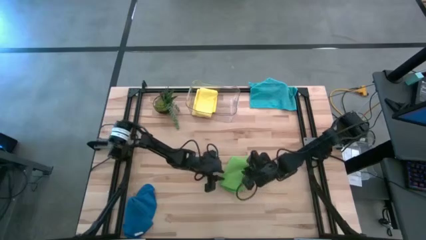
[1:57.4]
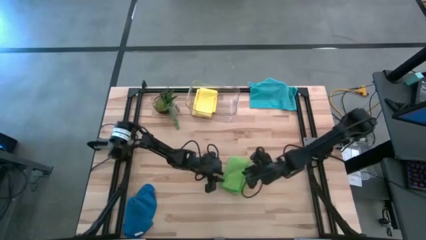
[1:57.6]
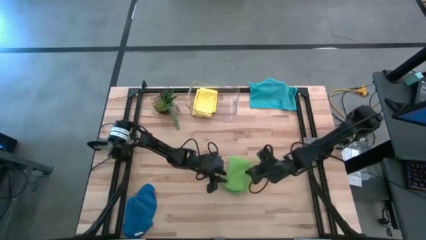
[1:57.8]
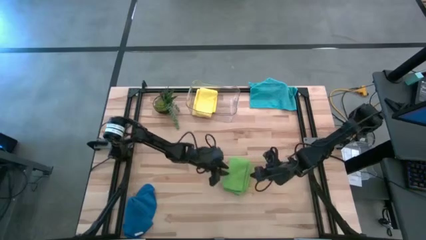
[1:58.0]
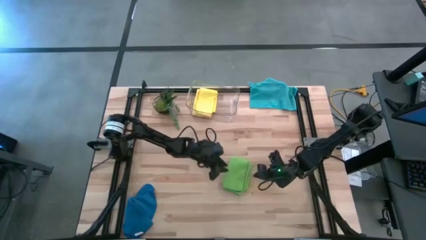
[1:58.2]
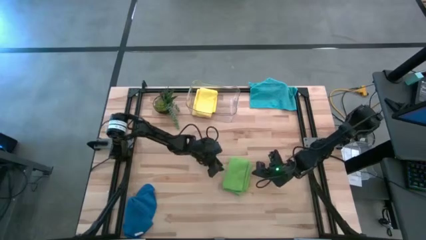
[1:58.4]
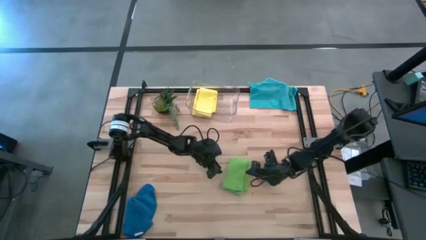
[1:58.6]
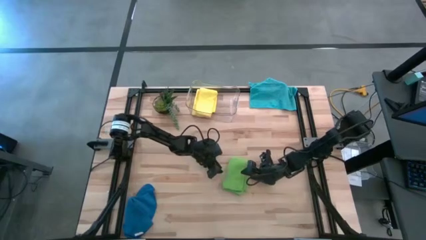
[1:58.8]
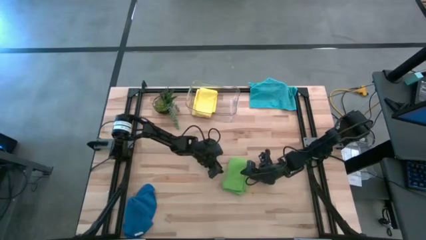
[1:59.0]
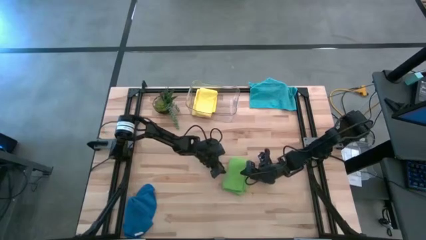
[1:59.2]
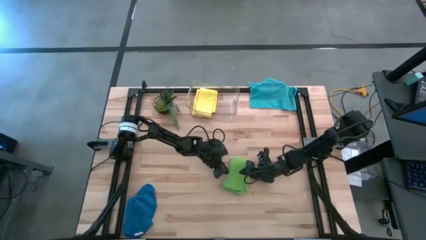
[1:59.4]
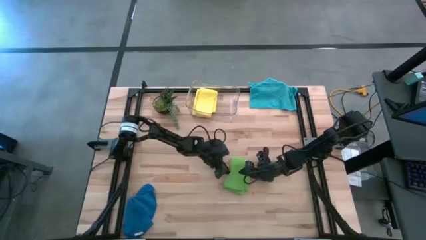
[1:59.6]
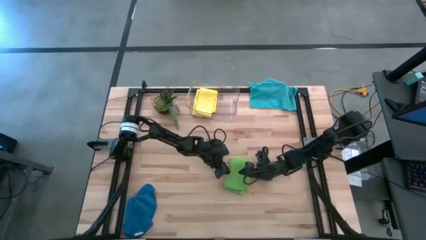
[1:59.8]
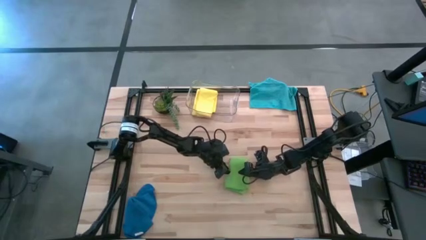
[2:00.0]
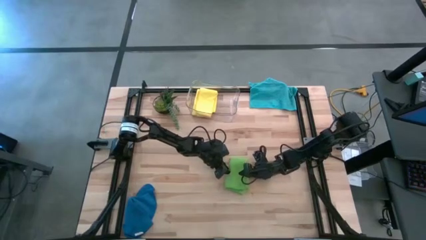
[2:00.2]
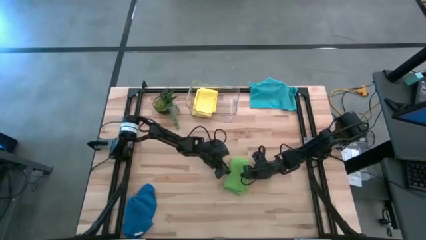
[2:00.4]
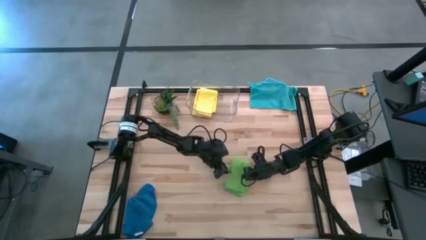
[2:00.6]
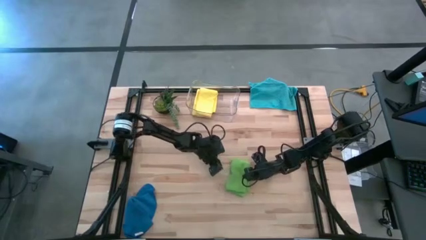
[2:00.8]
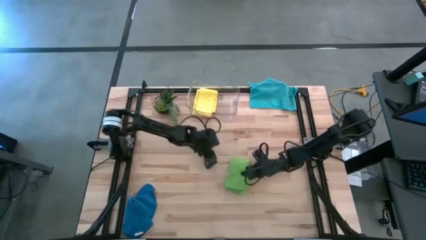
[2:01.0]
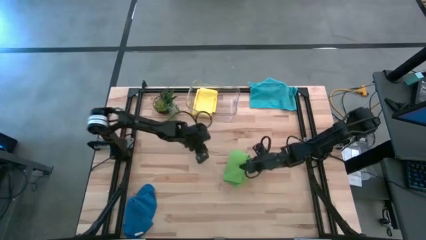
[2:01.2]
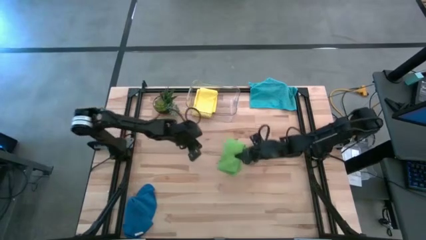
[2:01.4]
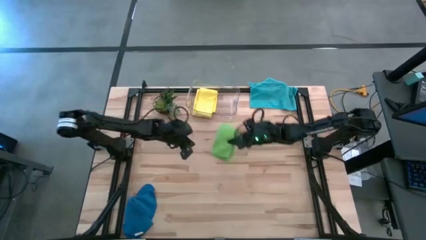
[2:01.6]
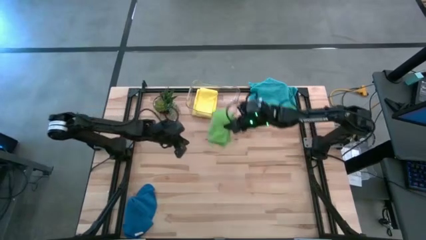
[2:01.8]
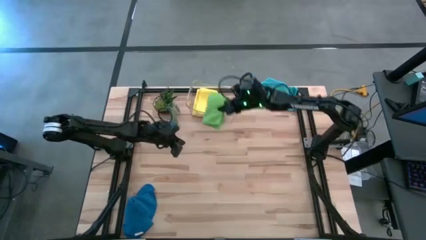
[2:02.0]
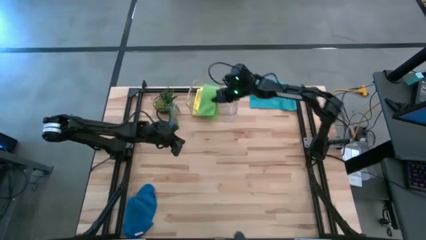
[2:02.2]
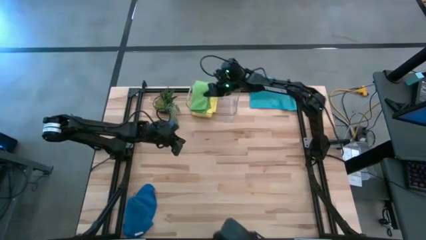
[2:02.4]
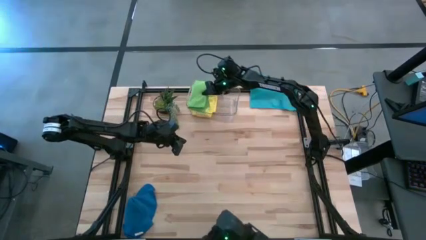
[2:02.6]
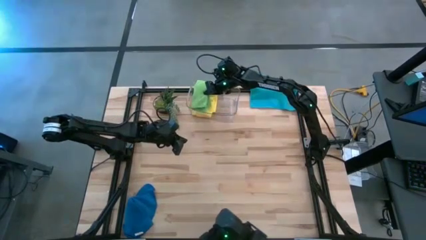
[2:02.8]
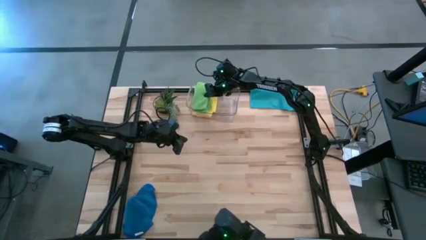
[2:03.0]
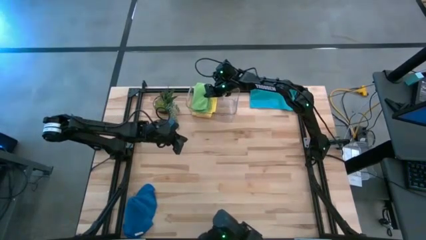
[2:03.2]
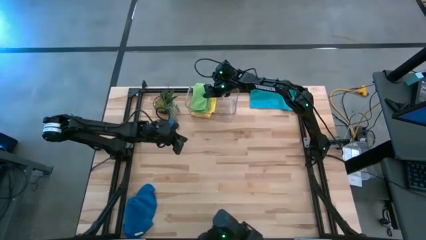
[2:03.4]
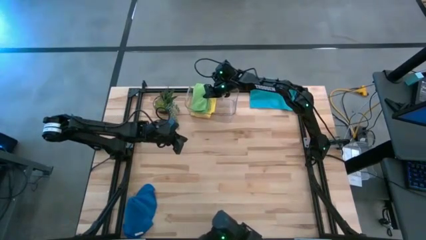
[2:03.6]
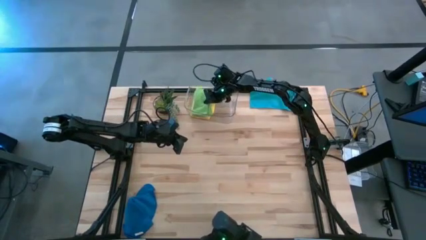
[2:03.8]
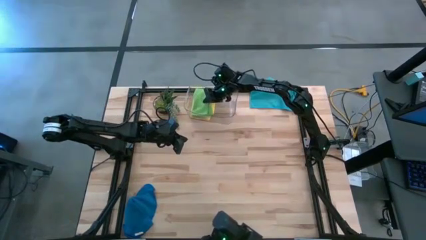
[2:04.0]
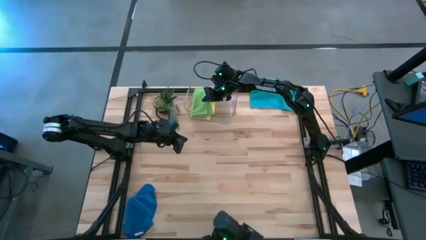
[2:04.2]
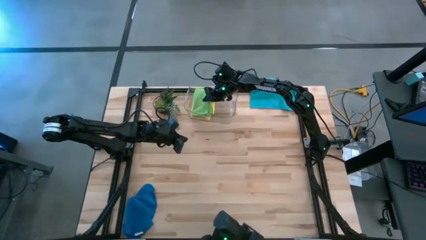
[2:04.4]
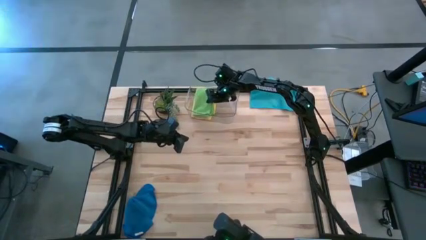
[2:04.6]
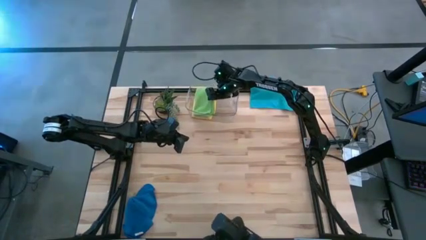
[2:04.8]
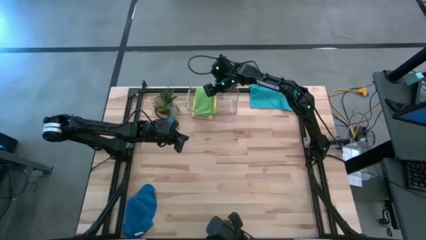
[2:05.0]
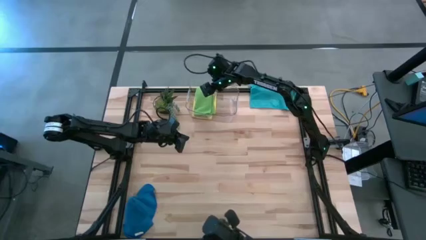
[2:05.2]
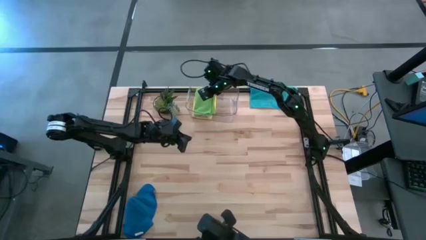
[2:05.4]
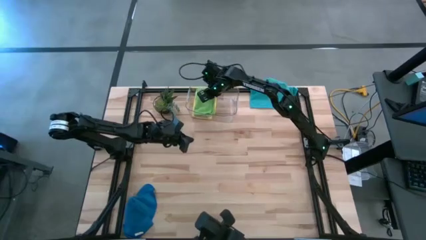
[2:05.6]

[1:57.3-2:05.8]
Task: Fold microfiber towels
Put the green towel into the bin

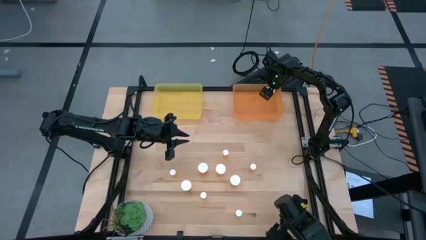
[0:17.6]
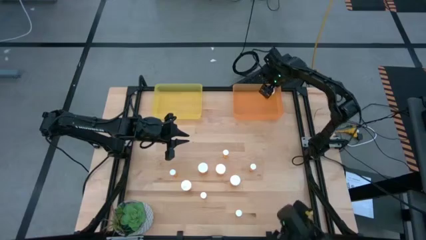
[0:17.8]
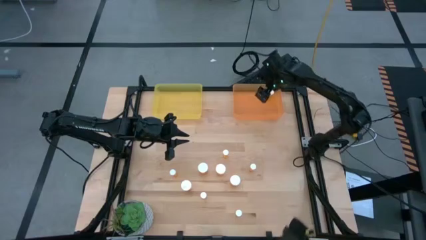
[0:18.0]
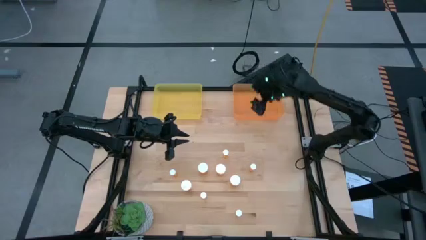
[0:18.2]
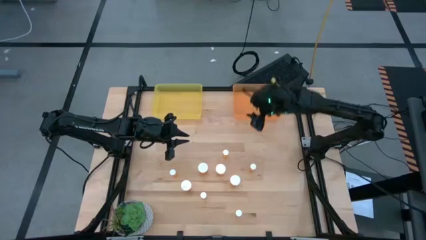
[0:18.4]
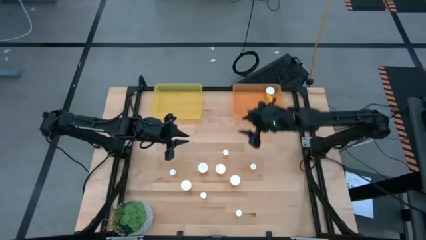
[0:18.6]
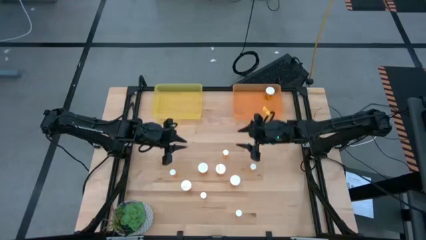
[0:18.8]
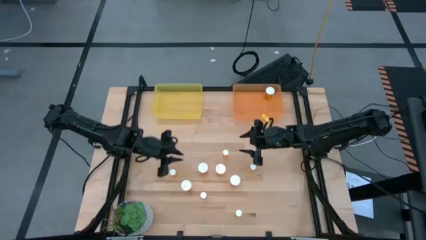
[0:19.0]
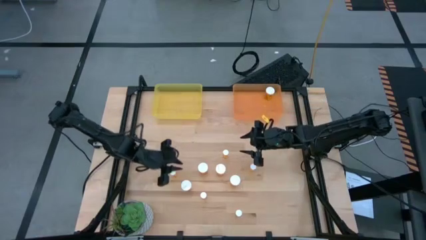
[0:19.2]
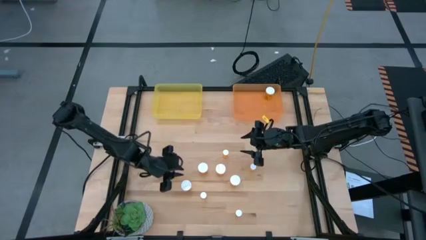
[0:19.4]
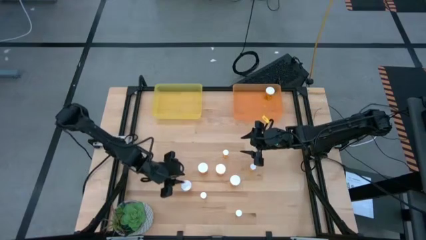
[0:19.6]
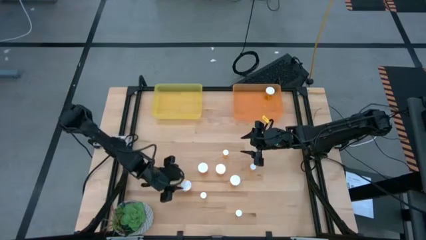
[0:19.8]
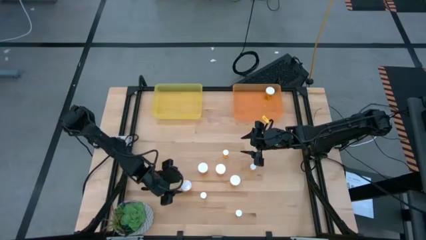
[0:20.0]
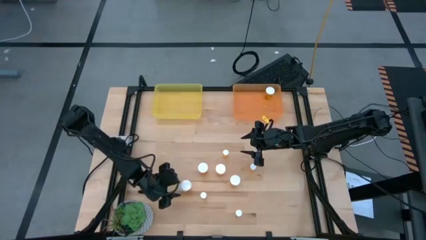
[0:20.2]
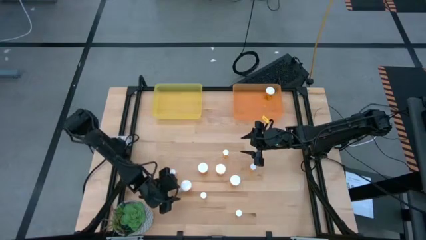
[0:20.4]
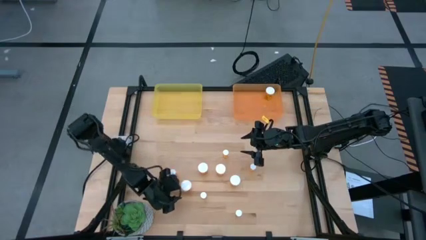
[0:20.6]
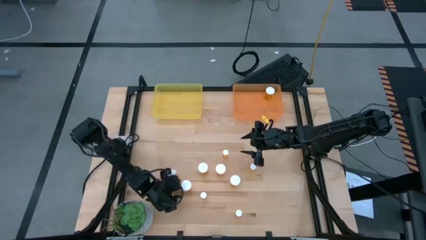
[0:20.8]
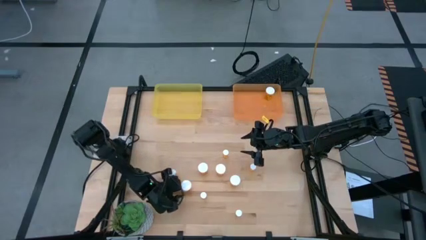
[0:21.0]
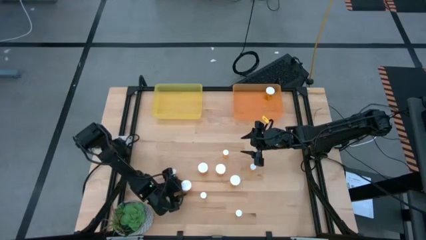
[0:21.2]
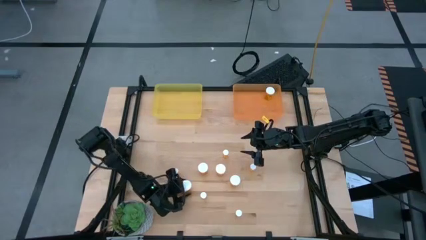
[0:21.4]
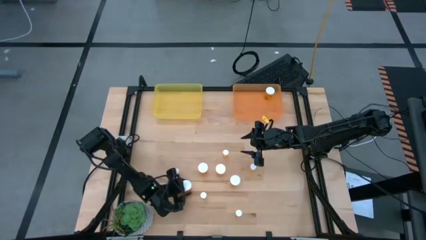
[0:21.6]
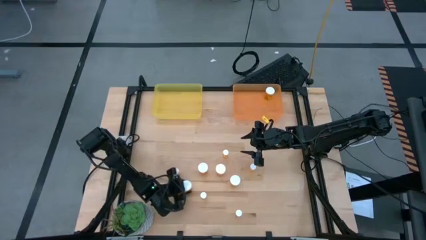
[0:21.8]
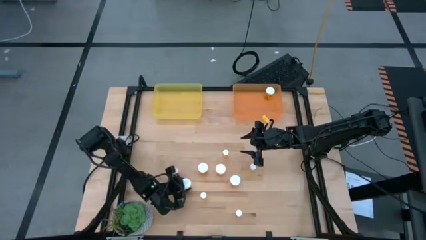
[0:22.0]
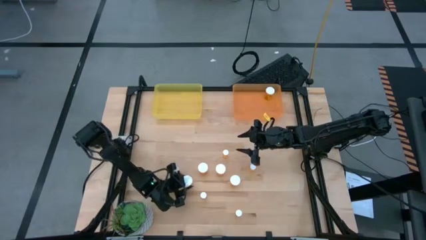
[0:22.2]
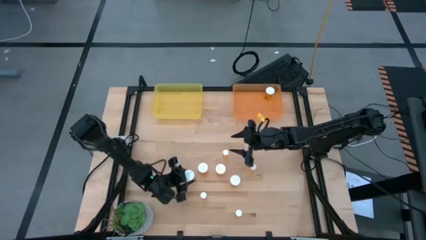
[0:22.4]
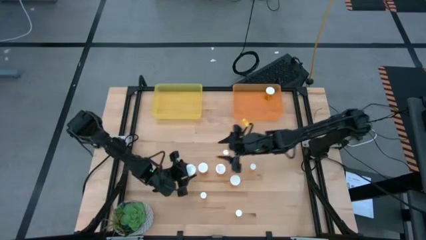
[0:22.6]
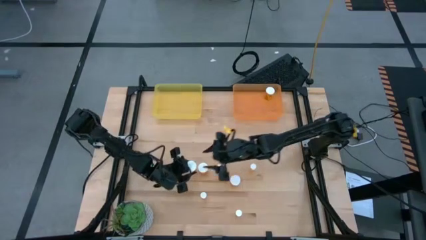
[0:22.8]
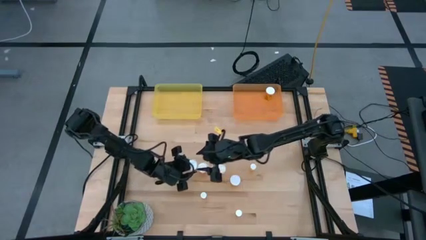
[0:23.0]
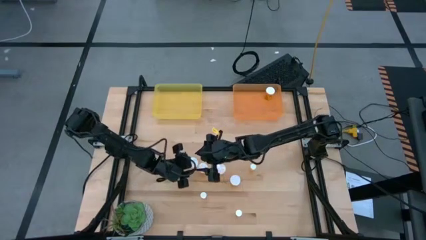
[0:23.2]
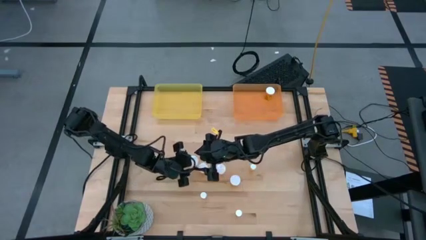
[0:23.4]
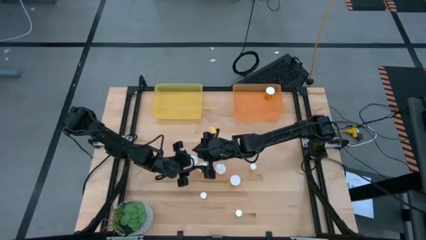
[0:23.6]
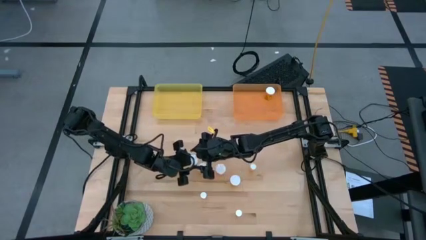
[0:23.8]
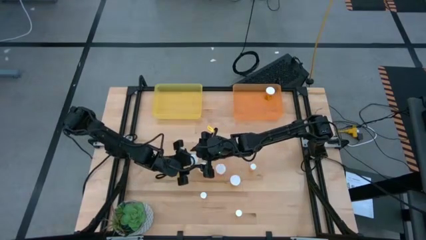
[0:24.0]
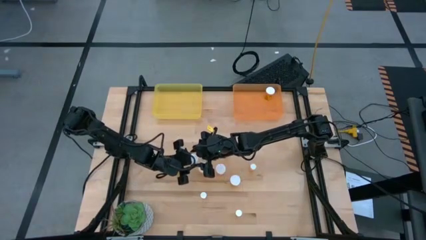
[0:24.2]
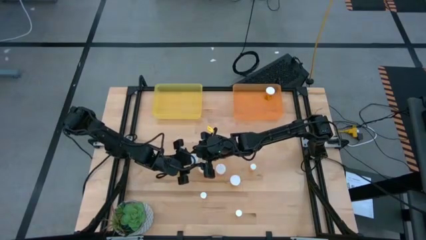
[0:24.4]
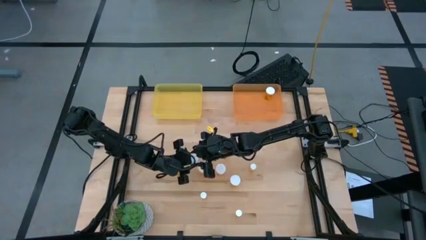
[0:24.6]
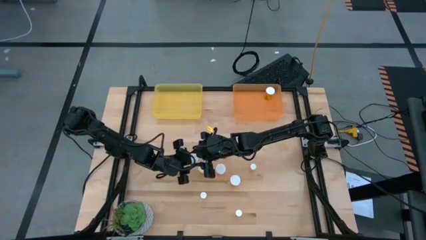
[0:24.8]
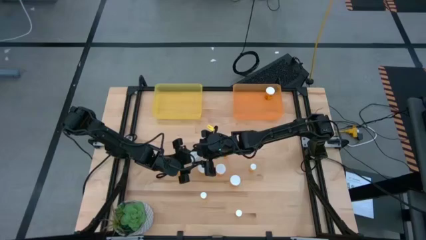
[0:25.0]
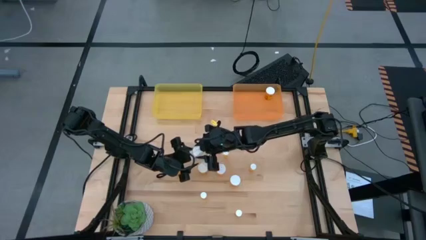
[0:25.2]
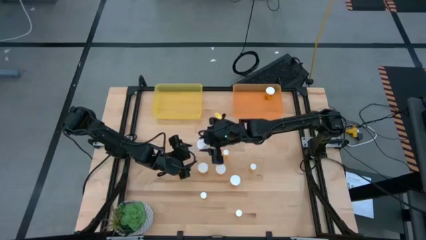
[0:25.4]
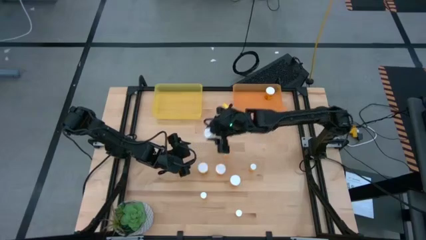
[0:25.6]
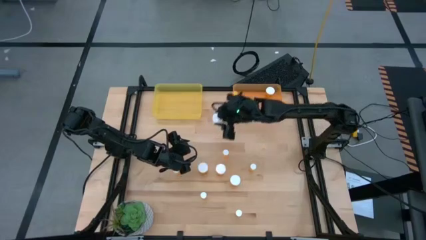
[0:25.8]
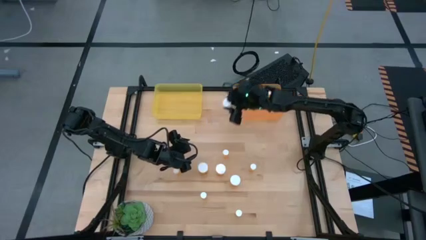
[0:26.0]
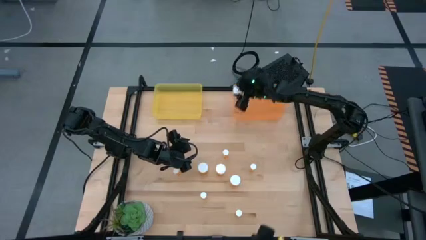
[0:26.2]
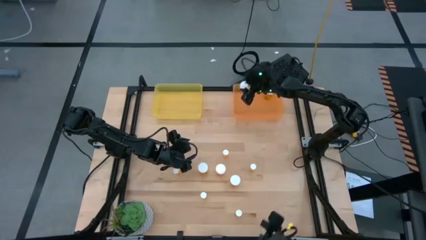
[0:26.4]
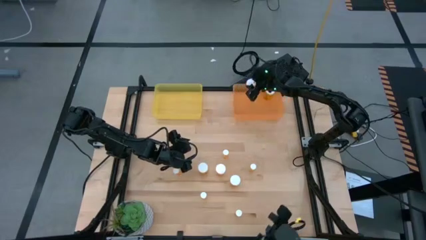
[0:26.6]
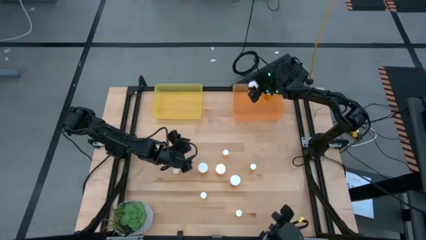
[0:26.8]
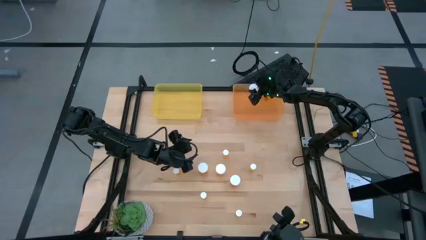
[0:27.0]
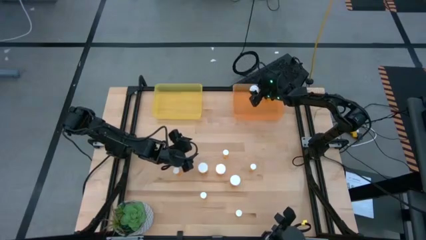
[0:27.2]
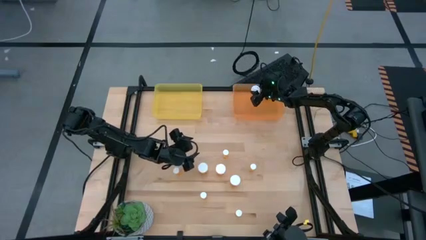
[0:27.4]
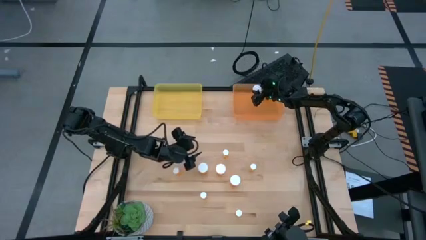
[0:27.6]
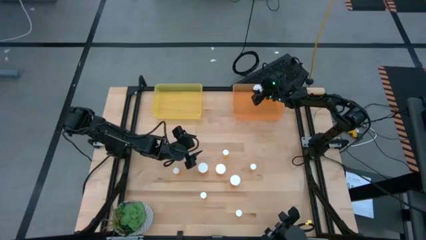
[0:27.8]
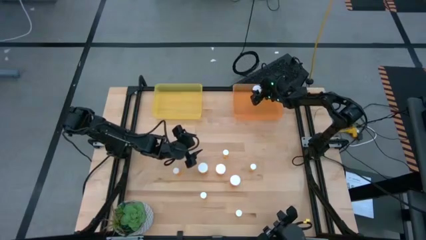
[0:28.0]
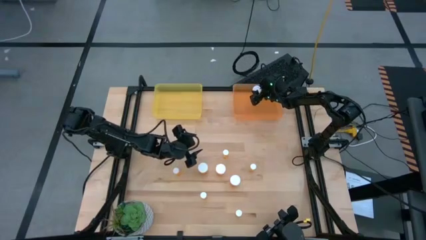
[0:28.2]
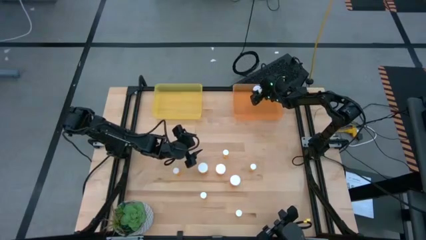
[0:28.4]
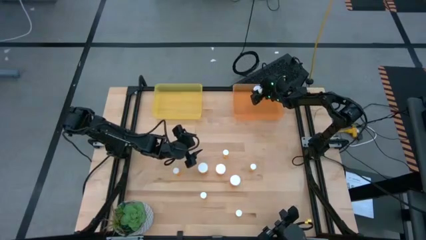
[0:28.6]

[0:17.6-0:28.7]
Task: Pick and place medicine bottles into bin by pill shape (circle, oval)
Put the big yellow pill bottle into the transparent orange bin
